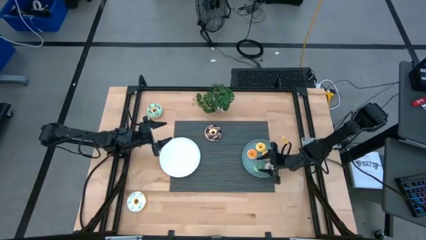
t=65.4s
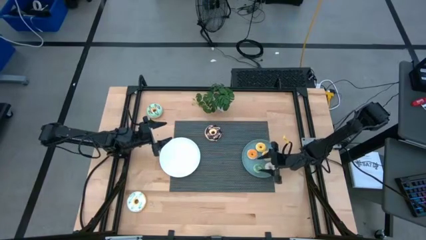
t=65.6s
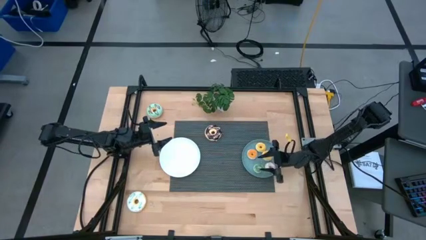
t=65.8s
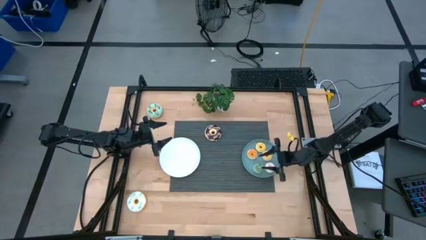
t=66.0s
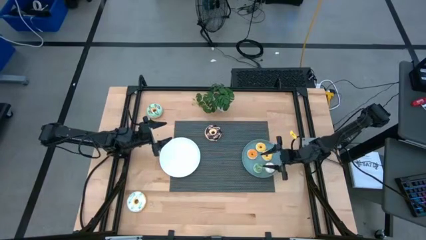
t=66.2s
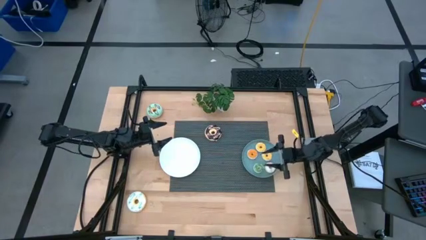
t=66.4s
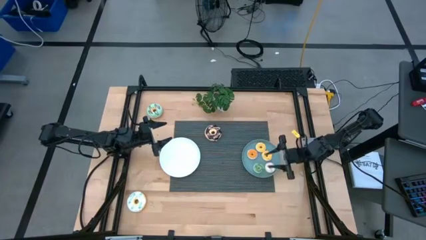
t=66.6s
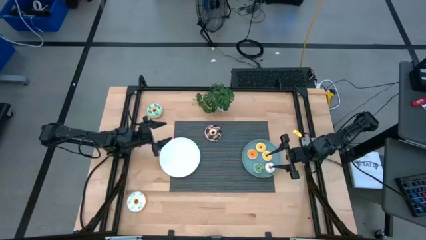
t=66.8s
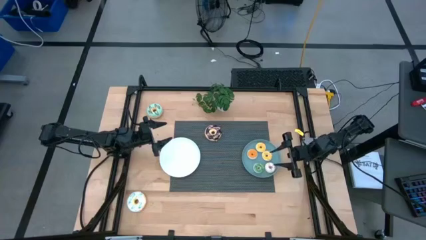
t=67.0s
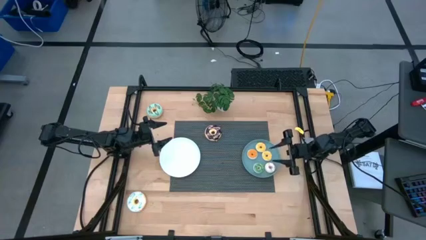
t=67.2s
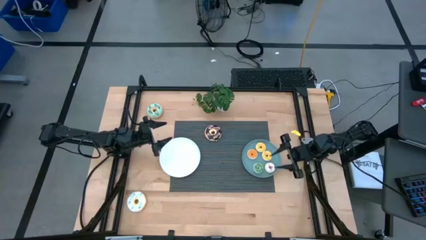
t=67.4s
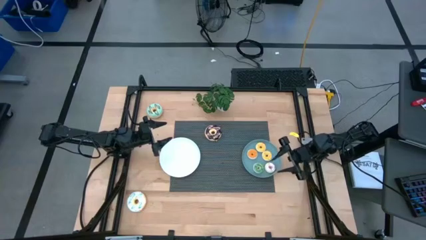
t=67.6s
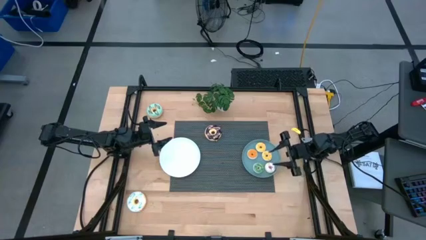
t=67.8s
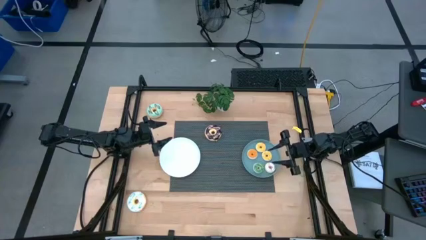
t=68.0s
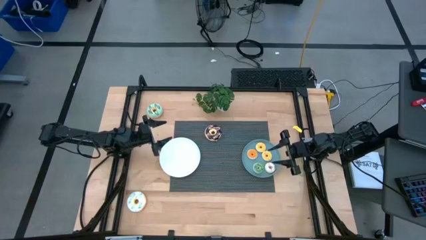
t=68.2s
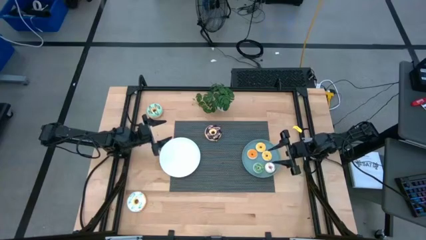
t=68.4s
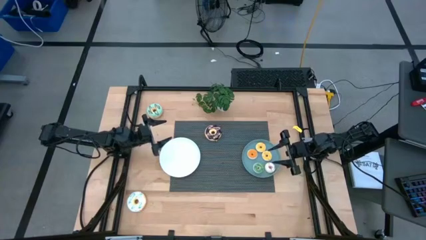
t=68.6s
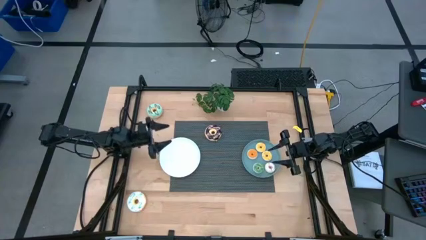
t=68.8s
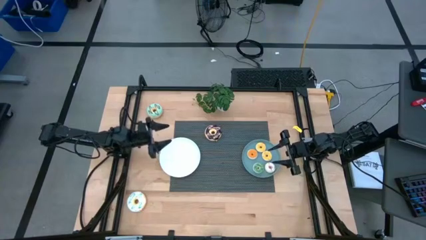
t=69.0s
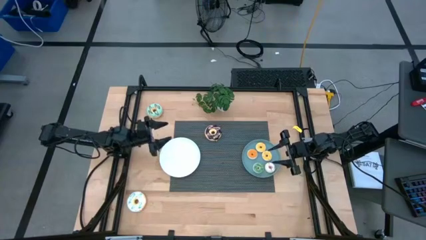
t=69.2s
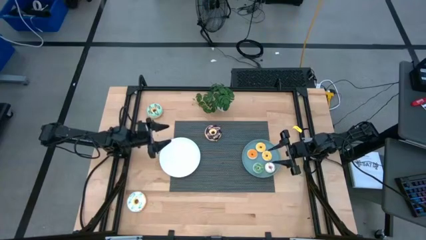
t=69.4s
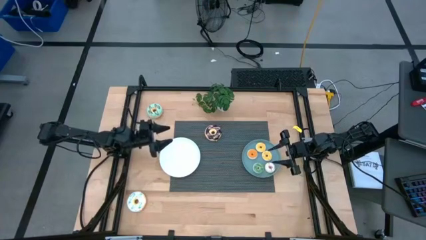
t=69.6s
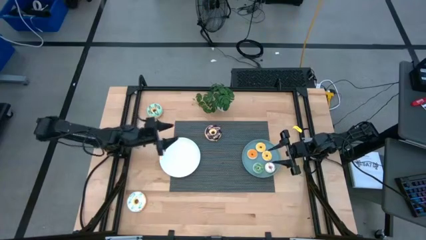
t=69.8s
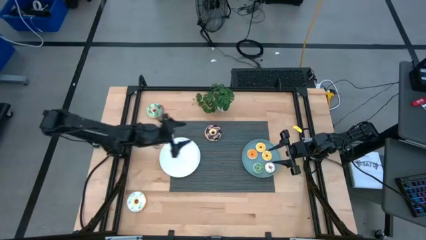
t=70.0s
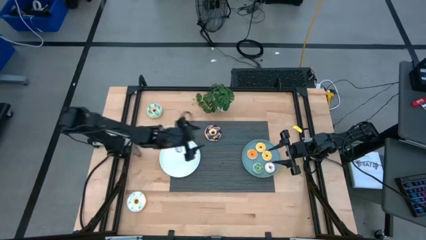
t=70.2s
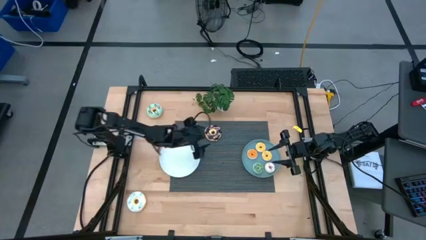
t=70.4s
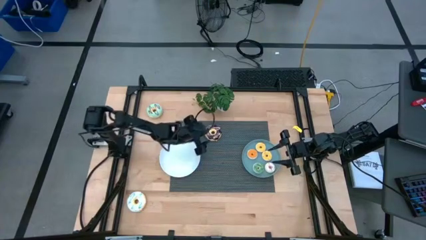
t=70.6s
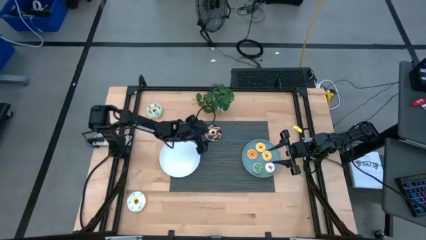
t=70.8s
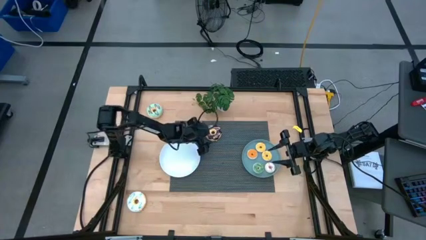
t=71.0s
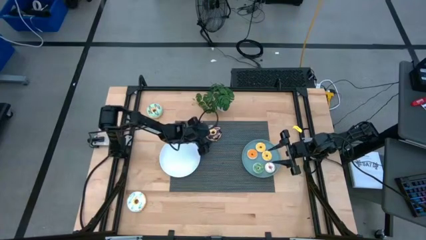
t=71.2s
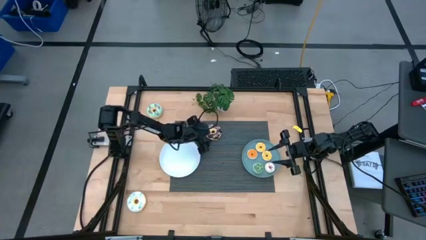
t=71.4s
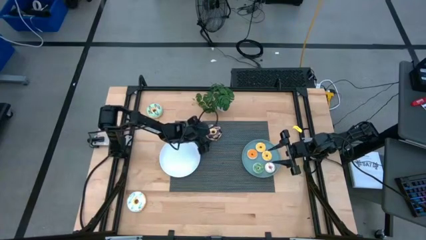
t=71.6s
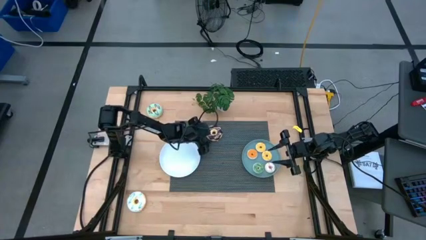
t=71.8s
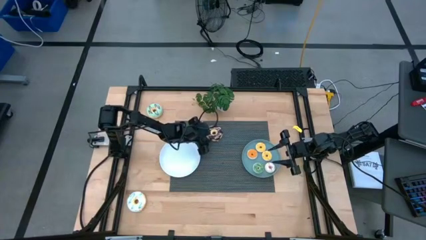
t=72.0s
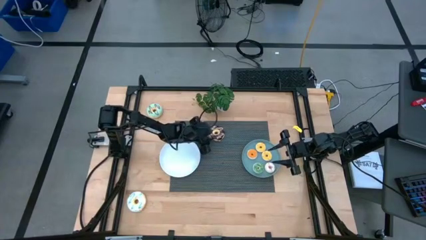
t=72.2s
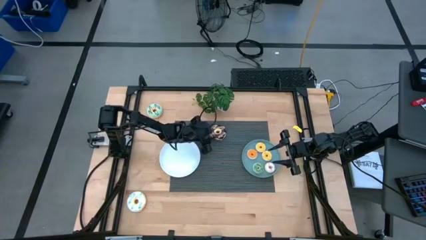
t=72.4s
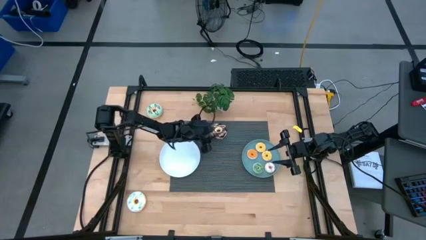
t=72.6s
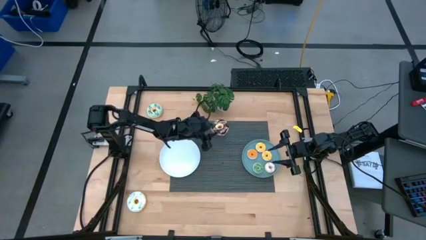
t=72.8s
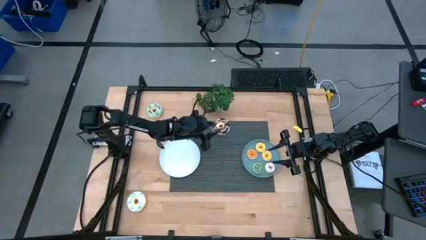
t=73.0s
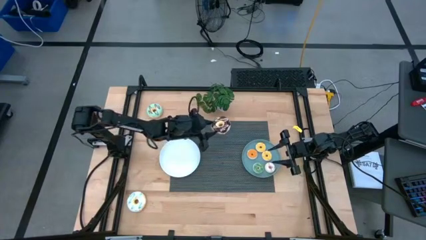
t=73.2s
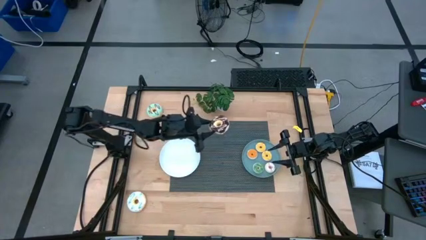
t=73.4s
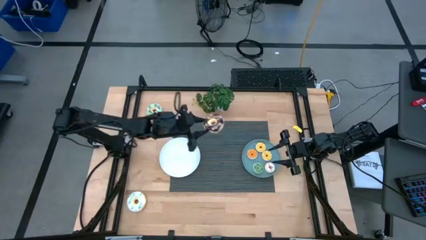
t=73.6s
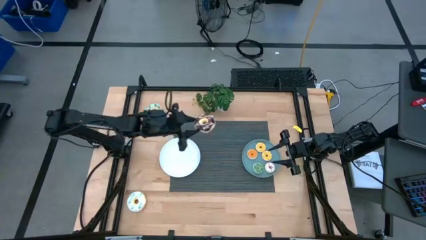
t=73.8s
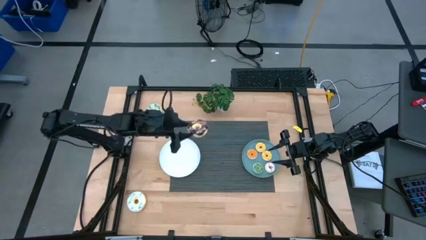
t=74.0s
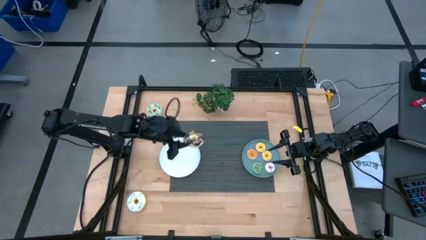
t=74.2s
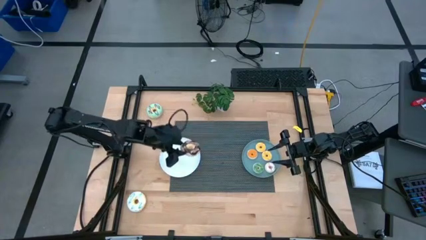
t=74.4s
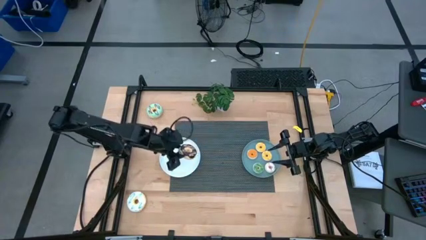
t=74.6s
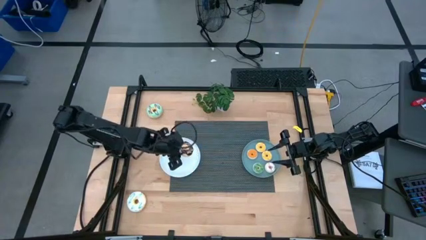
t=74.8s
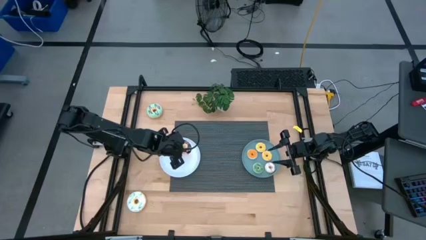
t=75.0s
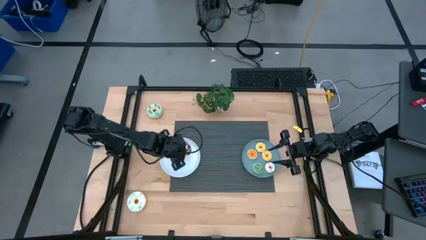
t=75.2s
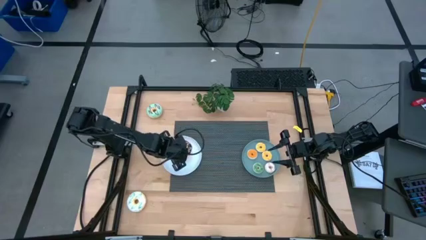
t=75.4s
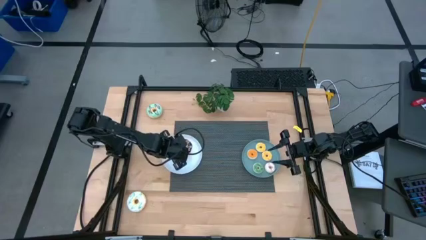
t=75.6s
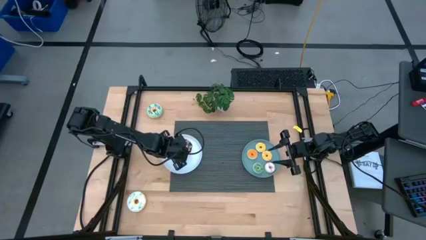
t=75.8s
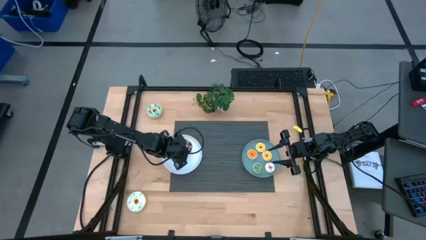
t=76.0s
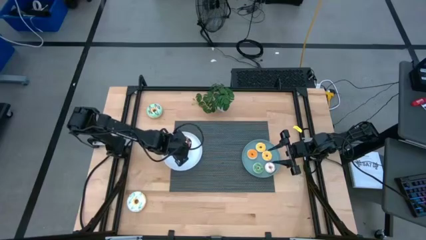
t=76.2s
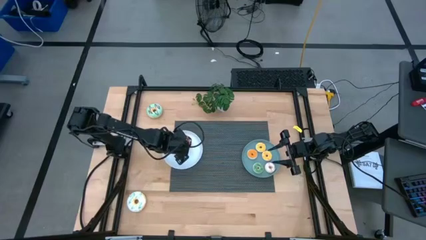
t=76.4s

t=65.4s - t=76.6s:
Task: Pick & Place donuts
Put the large black doughnut on top of the white plate

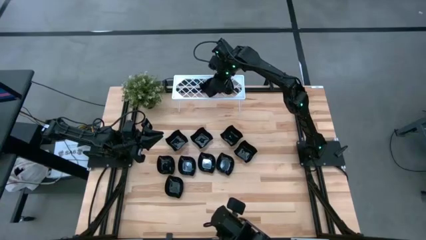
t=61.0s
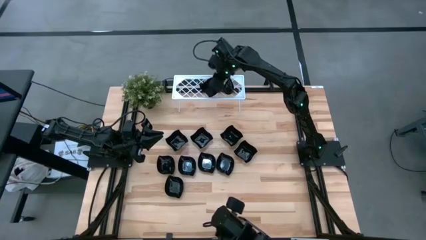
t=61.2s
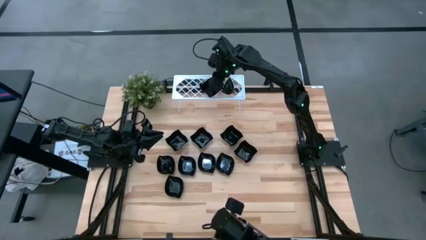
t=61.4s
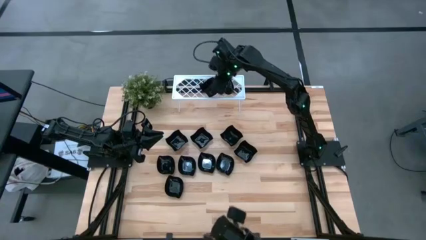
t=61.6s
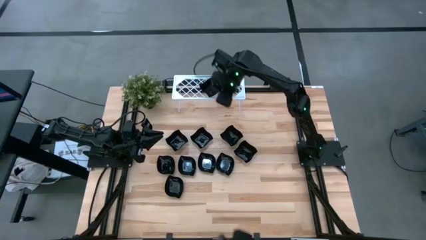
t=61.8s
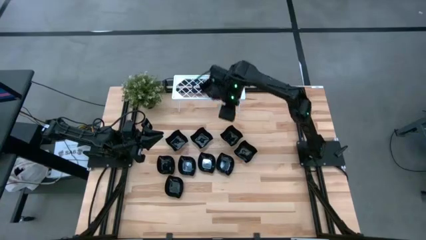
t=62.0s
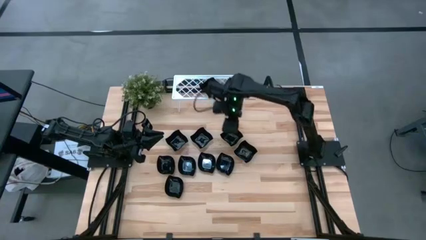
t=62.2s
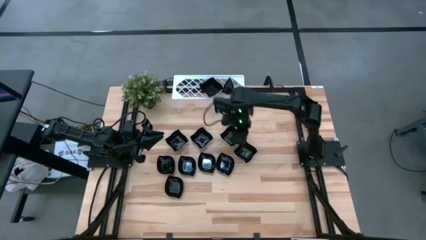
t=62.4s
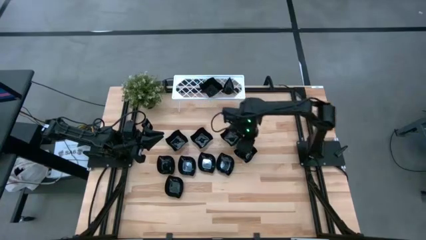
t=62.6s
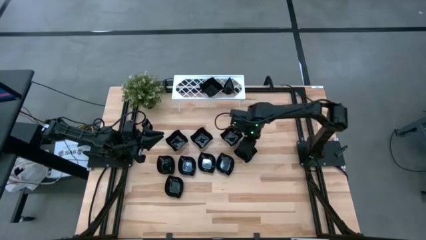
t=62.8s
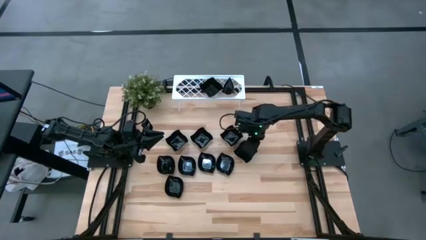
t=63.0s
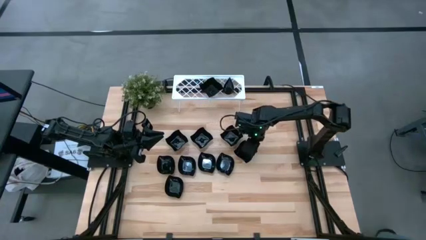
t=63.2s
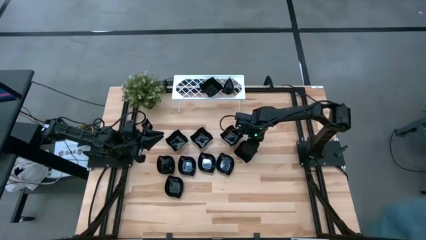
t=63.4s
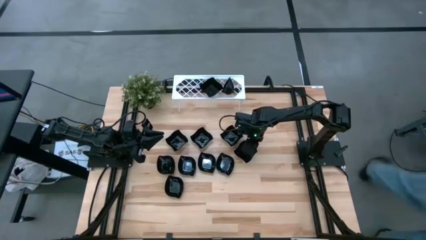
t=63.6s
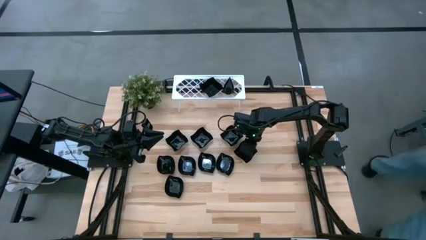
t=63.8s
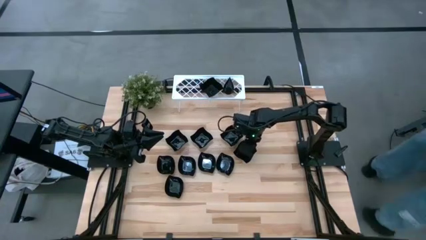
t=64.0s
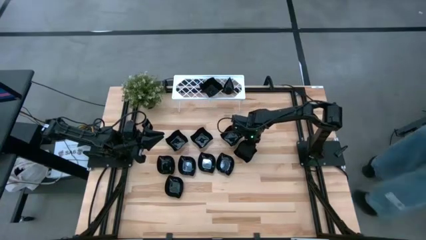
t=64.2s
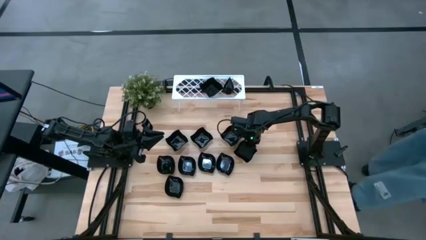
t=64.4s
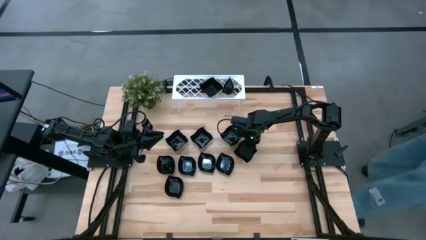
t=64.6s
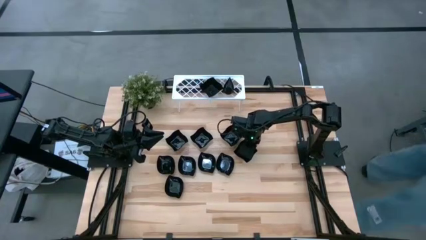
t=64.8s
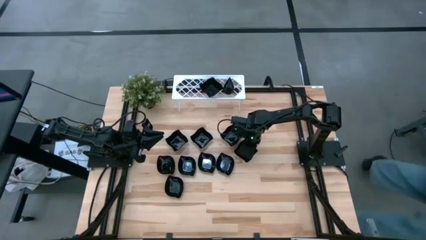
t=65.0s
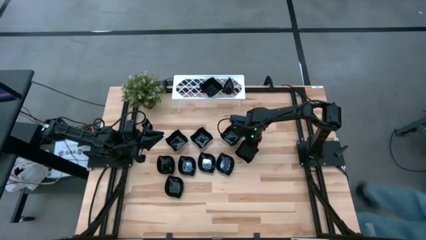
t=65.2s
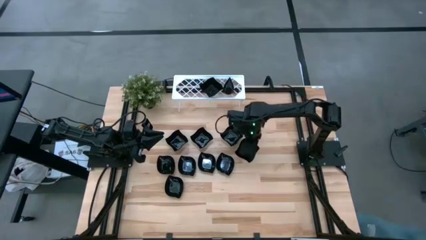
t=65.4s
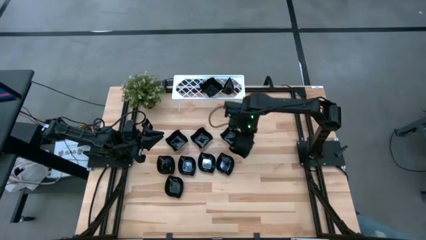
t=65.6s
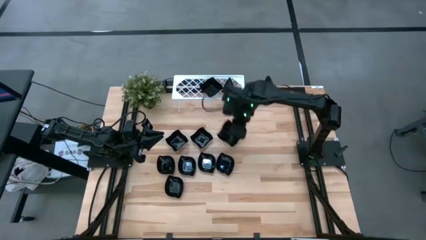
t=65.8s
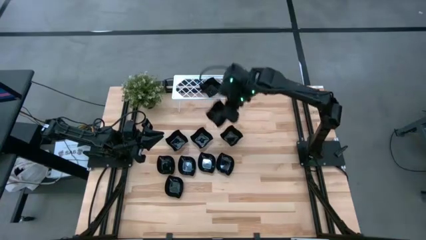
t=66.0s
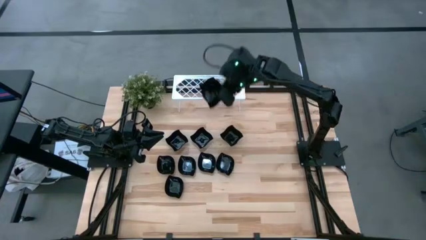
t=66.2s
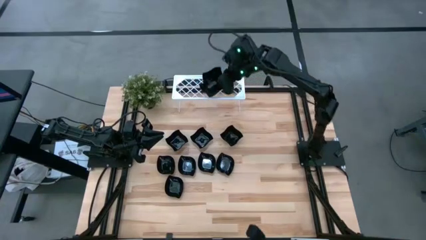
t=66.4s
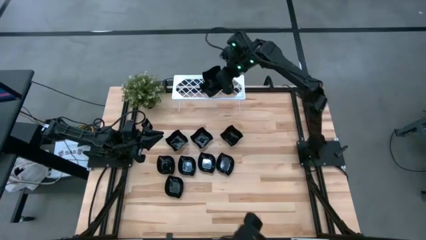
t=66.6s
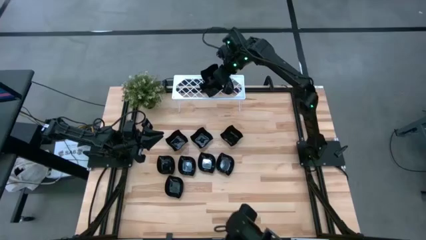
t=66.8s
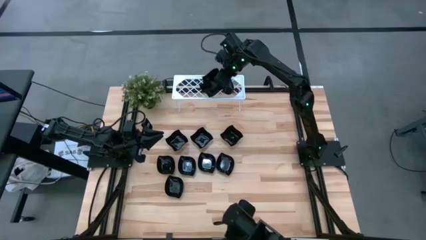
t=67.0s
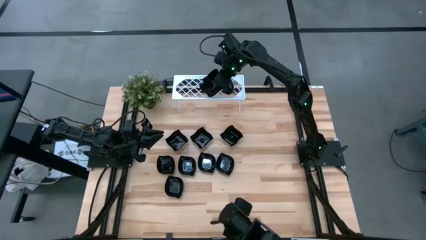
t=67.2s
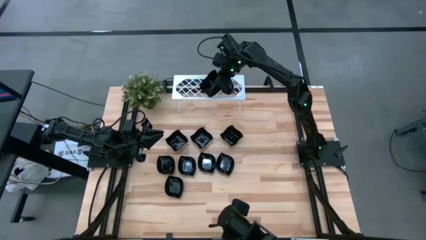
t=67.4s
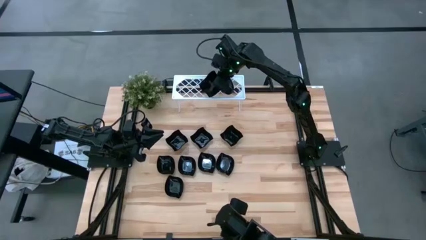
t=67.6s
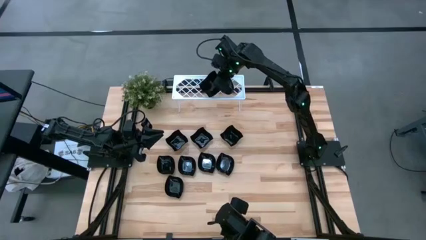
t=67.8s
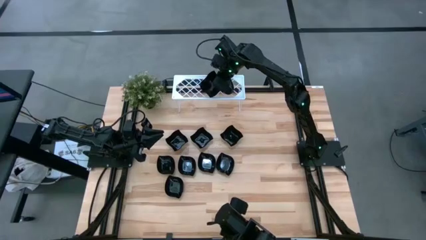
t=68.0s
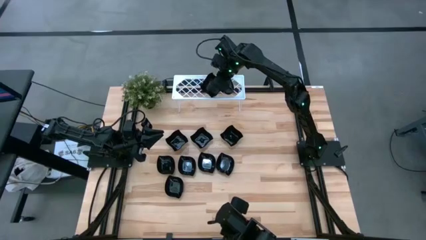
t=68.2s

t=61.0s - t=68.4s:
Task: Pick & Place Mini shaped plates
Stack the distorted square plate on top of the distorted square plate on the shelf
